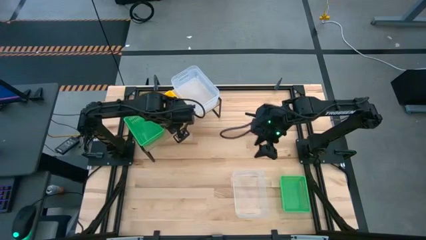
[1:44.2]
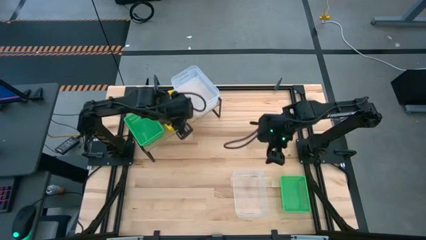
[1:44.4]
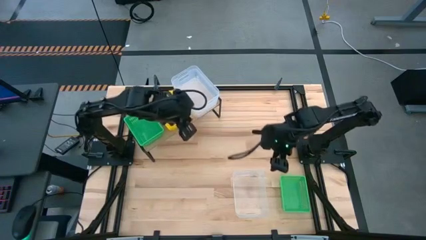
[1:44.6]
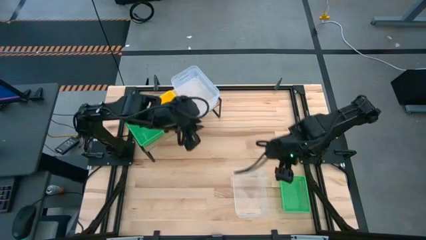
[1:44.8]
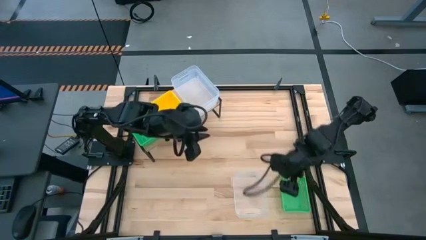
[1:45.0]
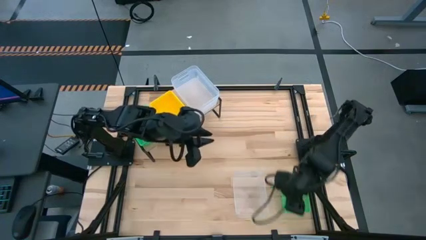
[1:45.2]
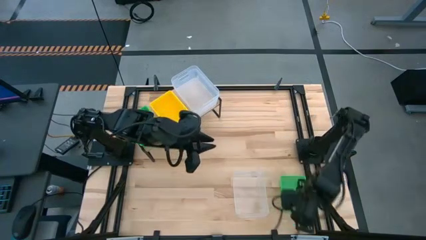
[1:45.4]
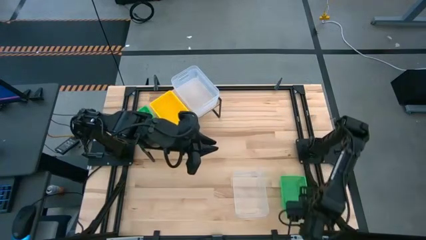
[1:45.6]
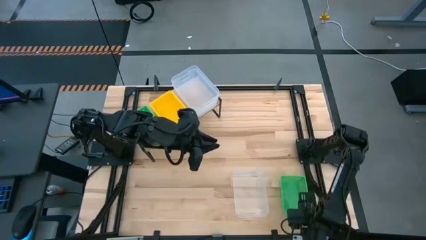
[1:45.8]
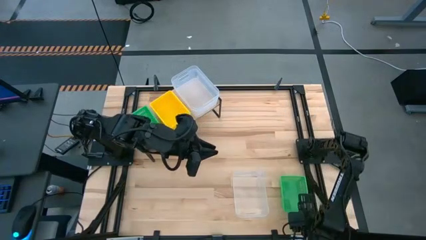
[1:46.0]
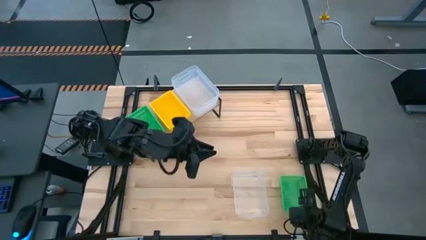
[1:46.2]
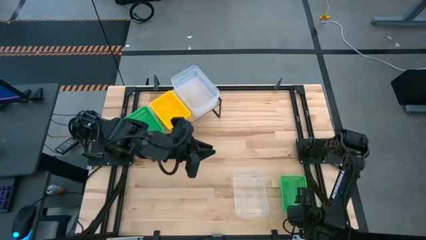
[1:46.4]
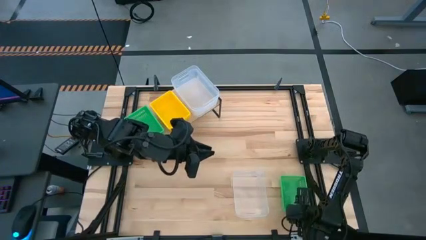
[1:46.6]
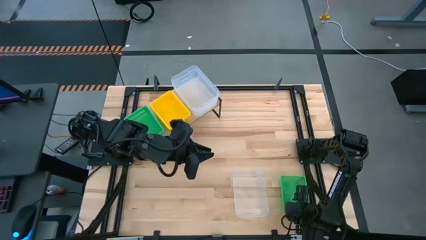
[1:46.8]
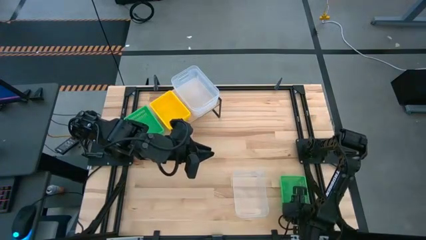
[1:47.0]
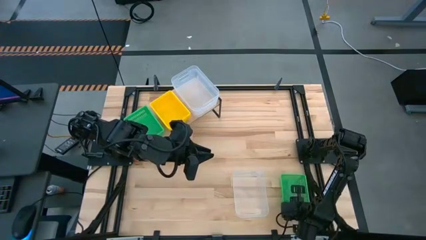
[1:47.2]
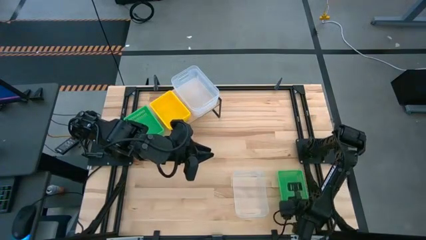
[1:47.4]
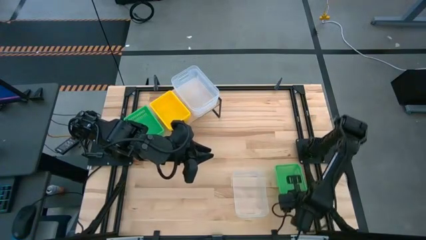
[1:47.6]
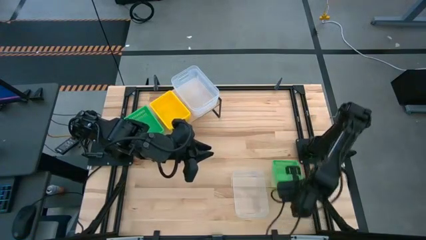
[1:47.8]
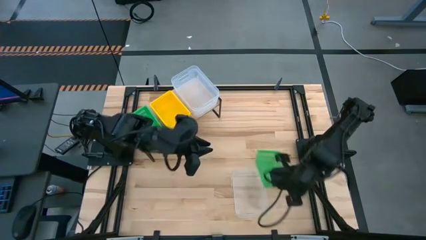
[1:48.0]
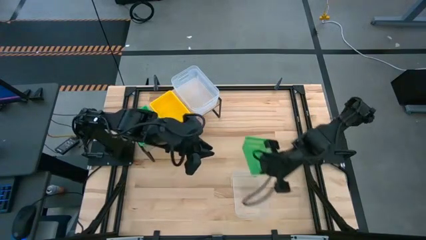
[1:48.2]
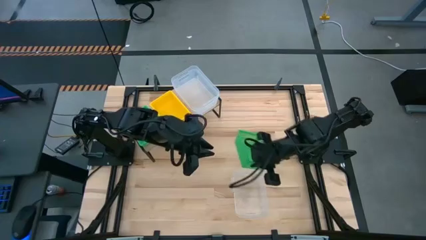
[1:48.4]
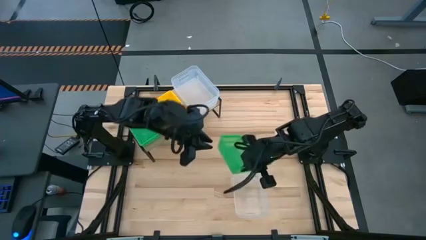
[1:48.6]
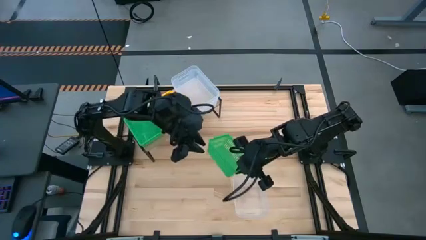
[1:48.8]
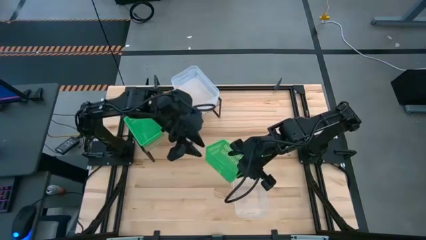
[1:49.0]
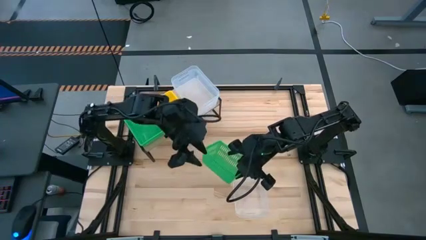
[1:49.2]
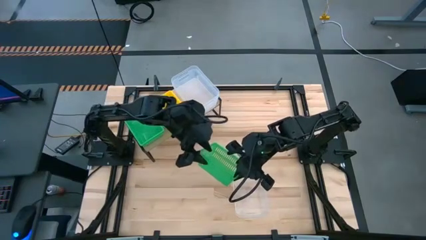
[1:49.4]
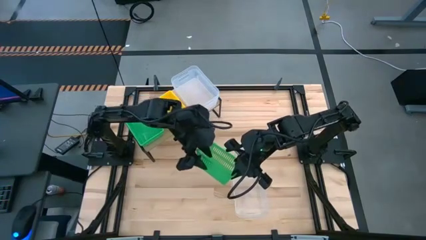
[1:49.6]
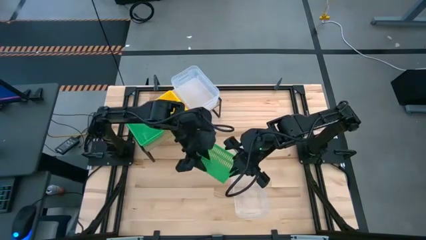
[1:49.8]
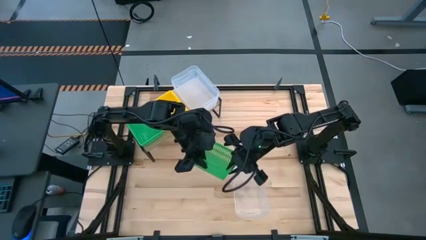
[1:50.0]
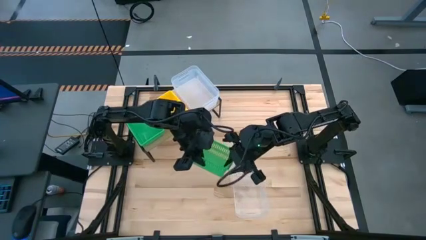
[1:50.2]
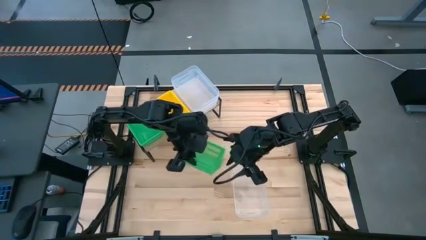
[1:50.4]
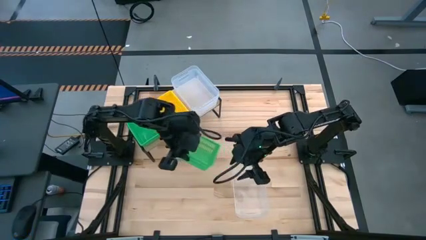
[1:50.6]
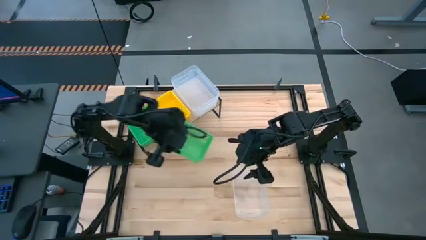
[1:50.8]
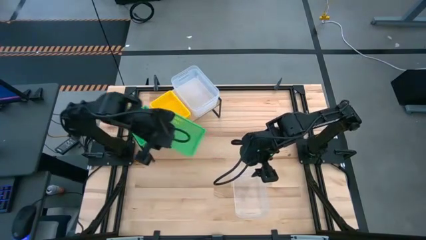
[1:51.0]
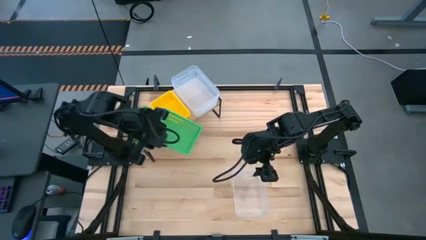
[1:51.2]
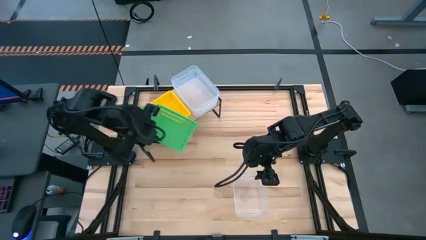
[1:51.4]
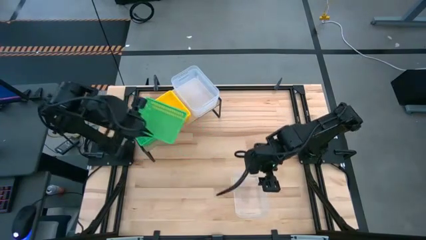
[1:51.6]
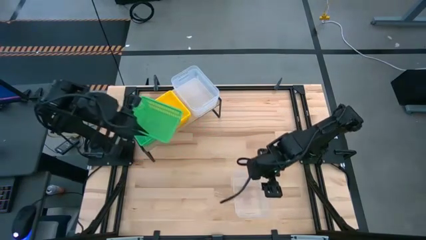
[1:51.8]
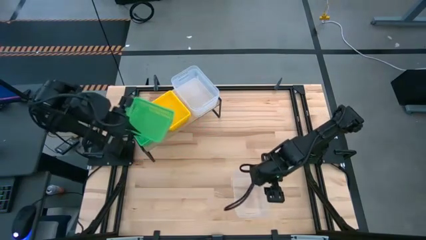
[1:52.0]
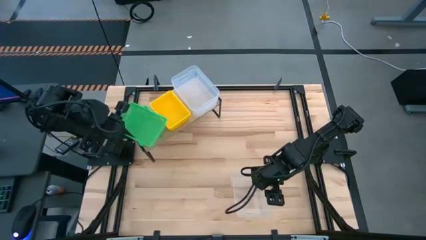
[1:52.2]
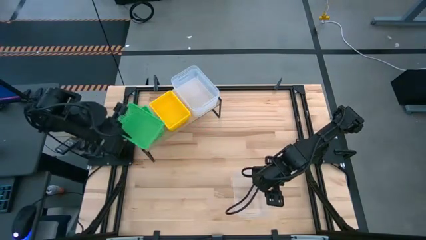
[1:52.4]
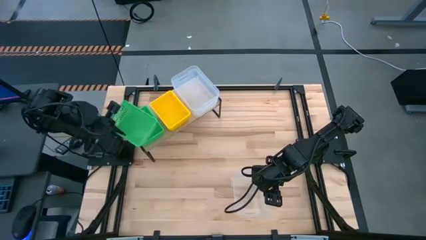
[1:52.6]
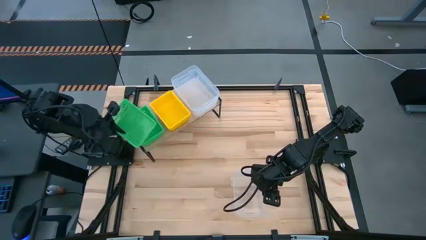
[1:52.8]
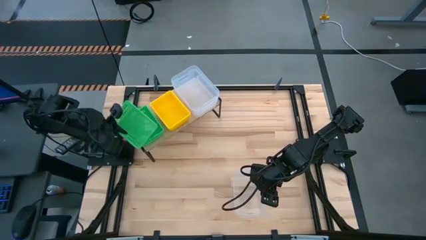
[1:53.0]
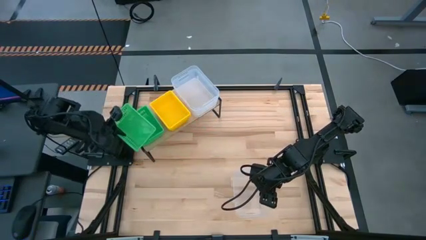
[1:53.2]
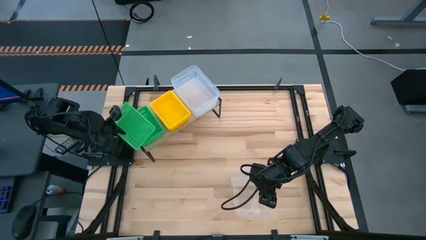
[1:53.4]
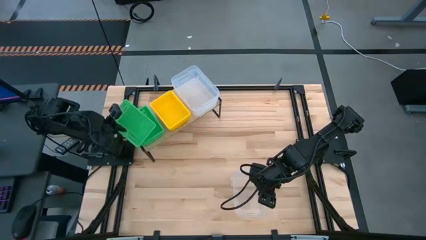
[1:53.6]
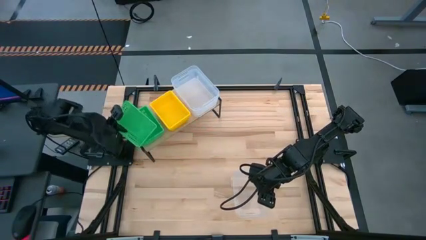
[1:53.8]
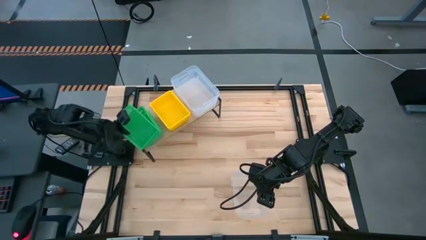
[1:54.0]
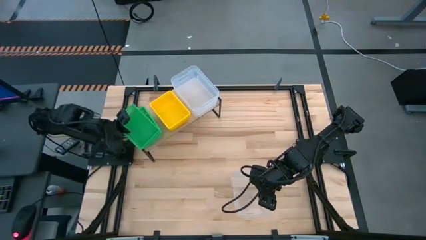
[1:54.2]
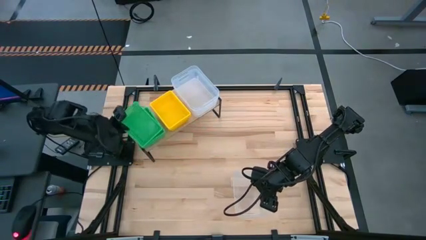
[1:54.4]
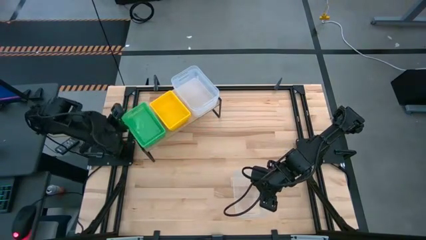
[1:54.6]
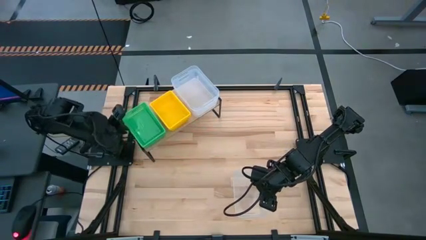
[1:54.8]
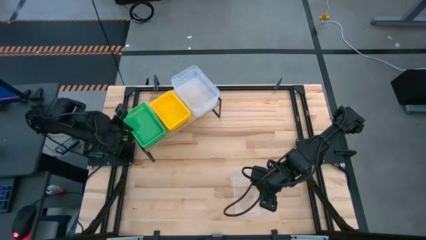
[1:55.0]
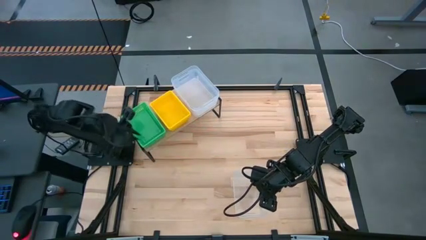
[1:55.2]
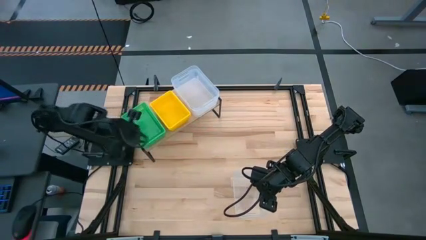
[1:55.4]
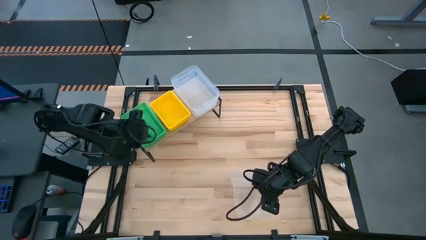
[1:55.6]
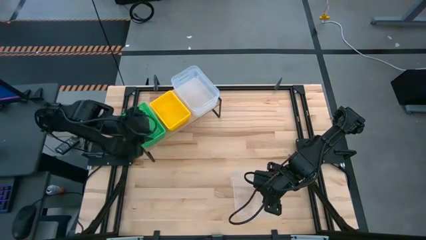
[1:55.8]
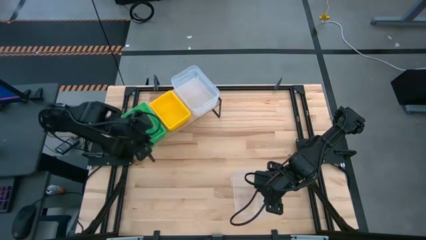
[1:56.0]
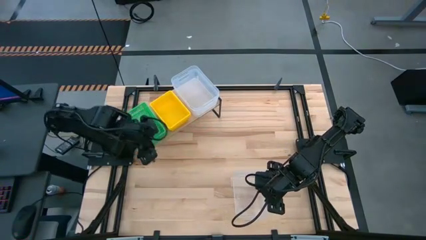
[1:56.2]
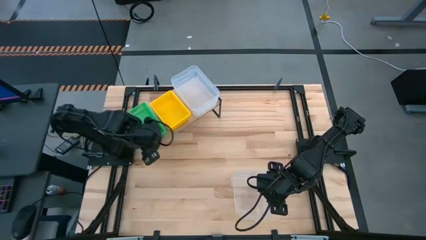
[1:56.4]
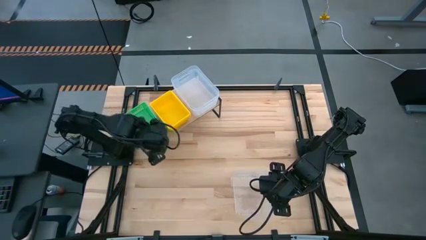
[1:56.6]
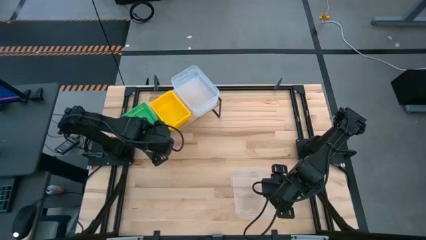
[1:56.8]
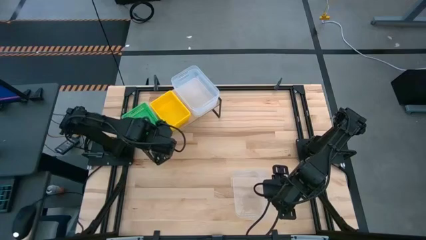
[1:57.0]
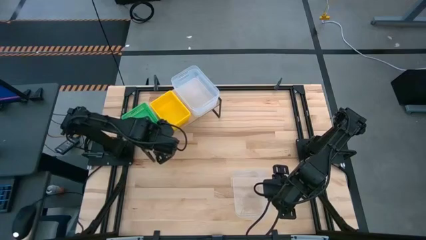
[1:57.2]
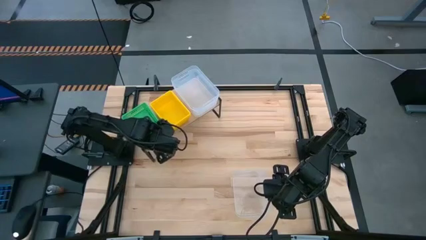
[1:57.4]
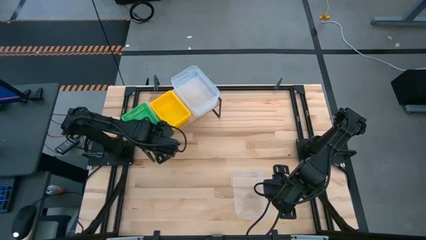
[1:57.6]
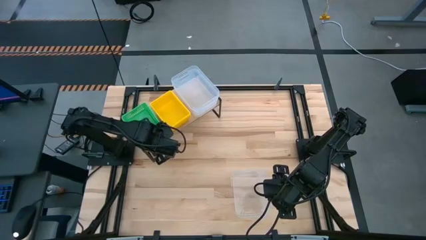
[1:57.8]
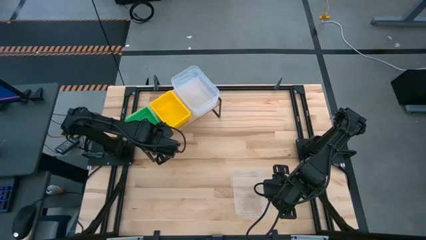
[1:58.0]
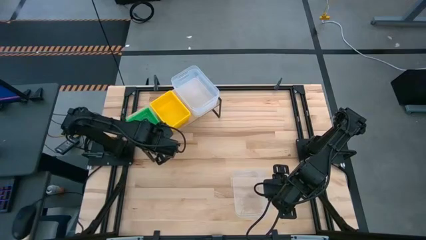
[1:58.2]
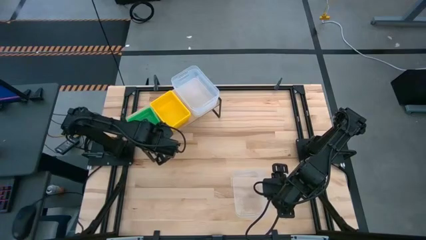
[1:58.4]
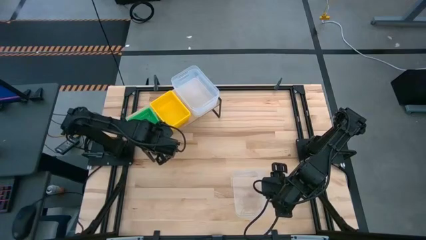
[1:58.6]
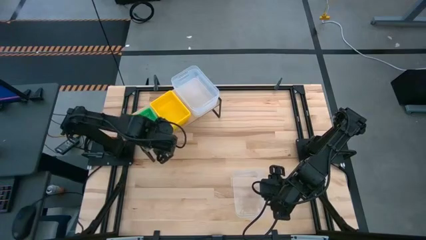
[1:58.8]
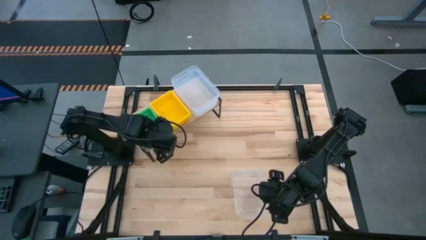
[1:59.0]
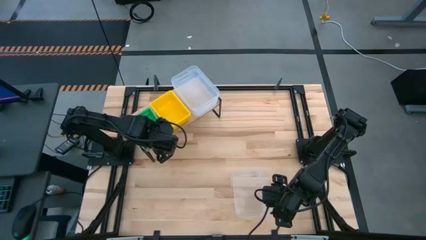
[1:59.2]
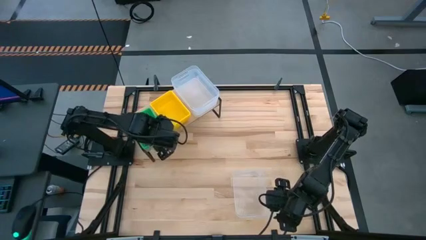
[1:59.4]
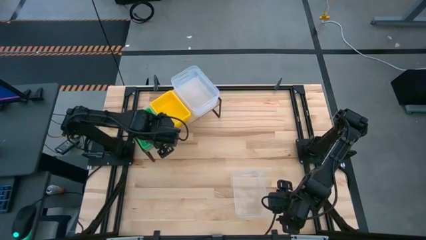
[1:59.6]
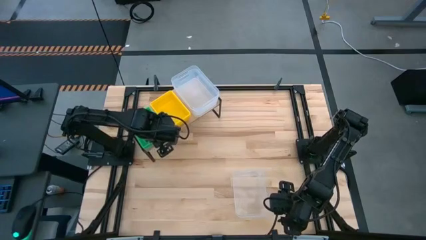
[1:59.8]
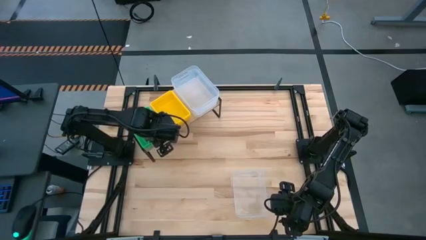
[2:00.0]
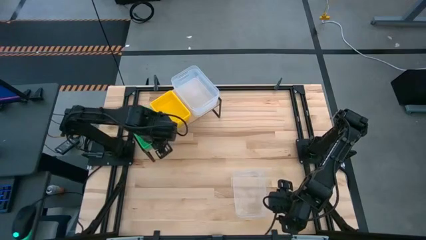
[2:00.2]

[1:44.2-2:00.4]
Task: Stack baskets on shelf by color
Stack the green bin on top of the other bin on the shelf
